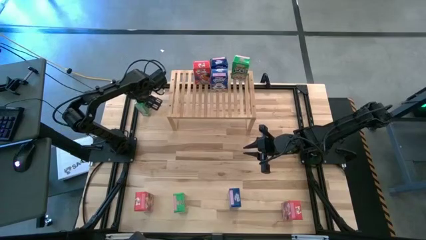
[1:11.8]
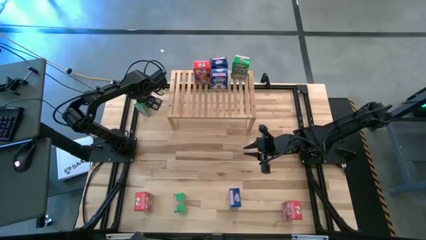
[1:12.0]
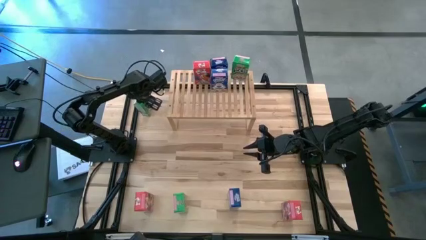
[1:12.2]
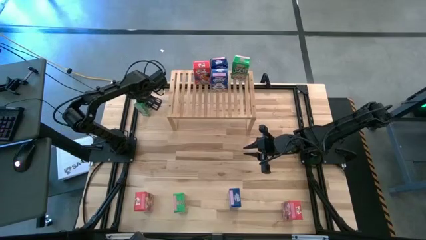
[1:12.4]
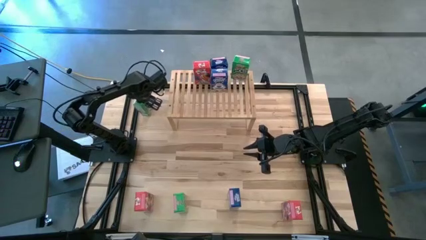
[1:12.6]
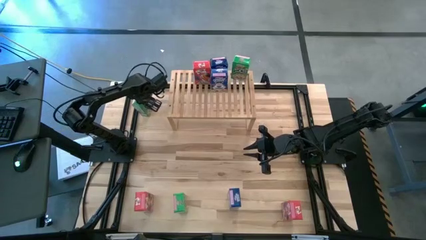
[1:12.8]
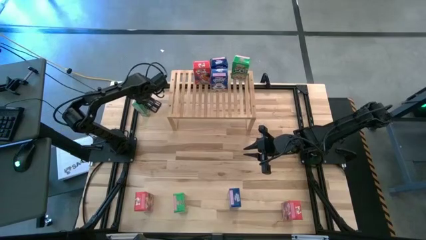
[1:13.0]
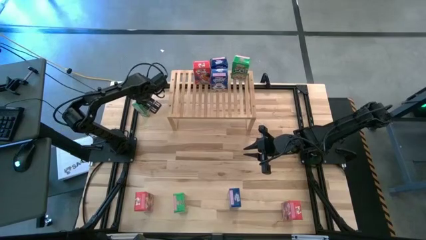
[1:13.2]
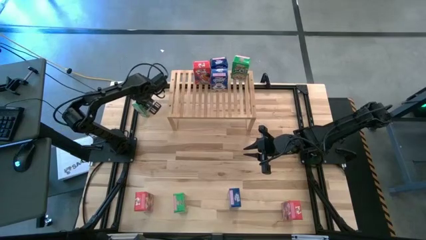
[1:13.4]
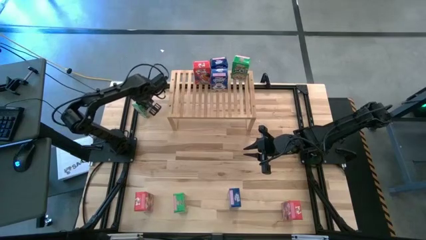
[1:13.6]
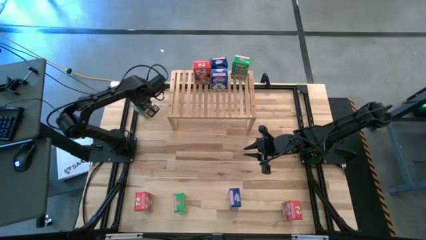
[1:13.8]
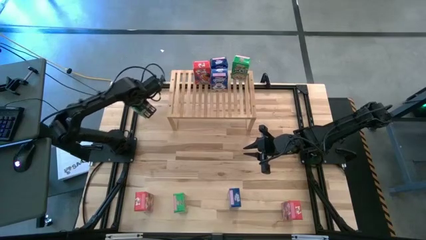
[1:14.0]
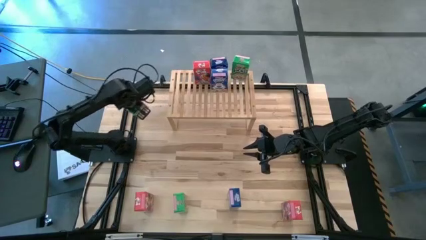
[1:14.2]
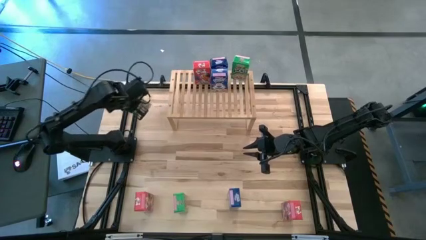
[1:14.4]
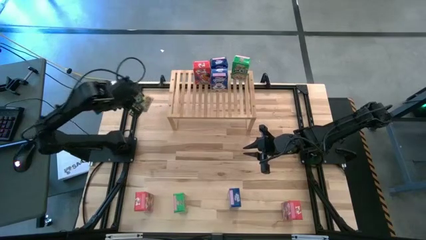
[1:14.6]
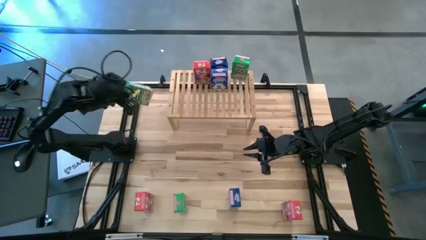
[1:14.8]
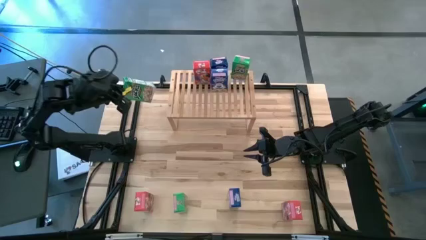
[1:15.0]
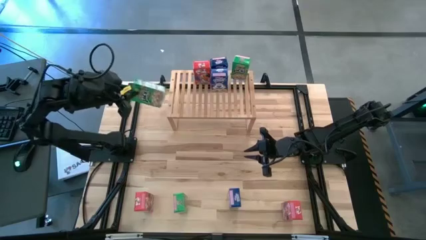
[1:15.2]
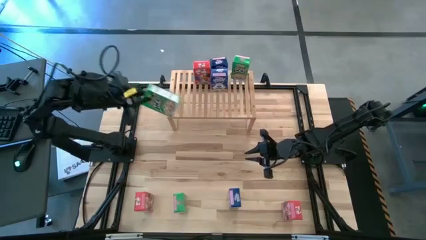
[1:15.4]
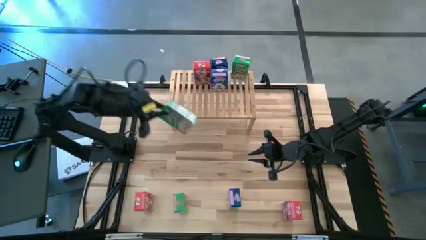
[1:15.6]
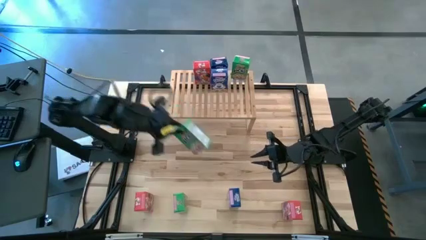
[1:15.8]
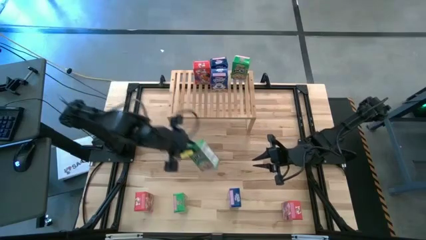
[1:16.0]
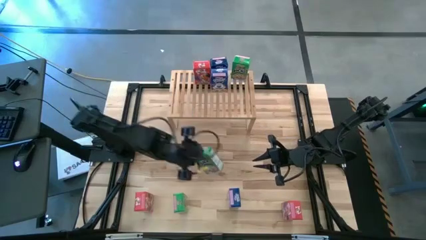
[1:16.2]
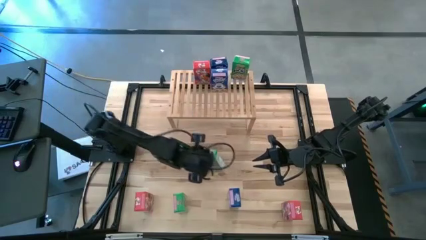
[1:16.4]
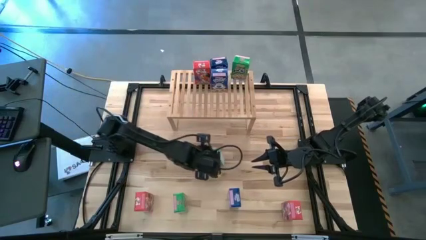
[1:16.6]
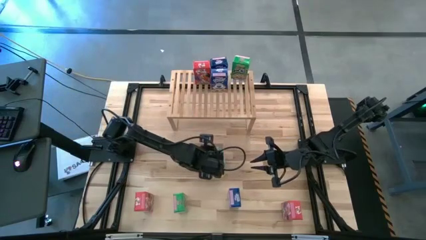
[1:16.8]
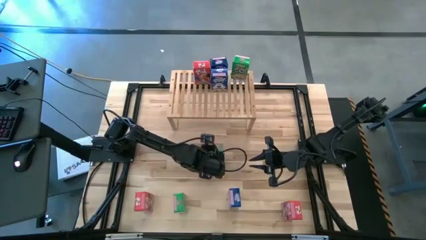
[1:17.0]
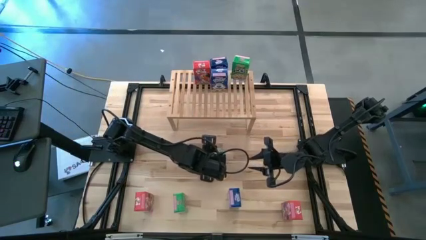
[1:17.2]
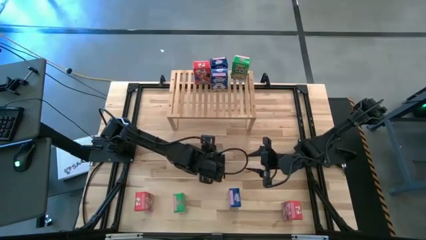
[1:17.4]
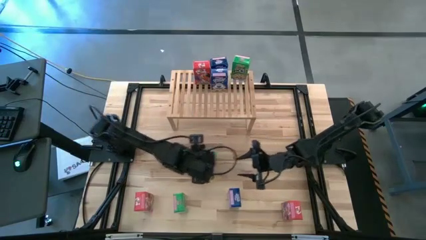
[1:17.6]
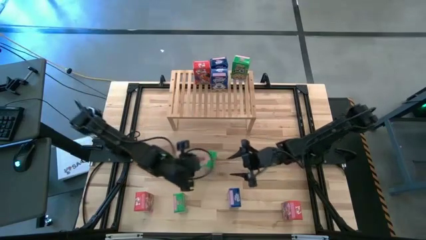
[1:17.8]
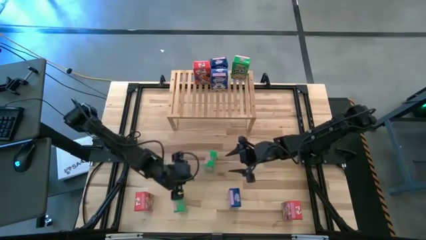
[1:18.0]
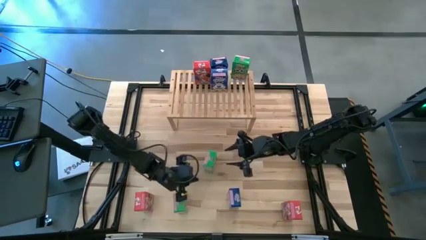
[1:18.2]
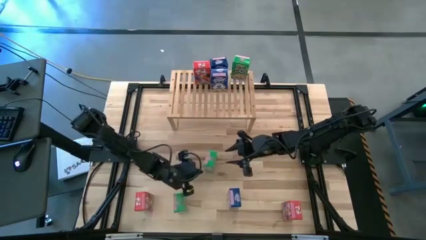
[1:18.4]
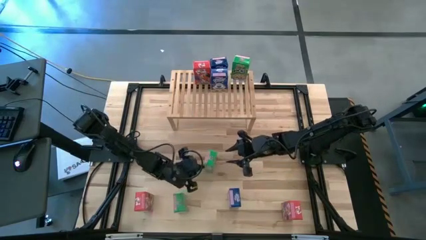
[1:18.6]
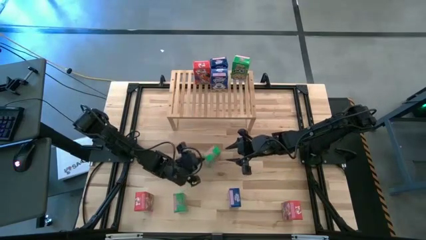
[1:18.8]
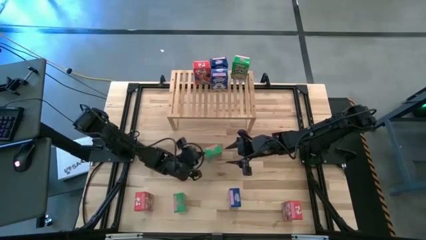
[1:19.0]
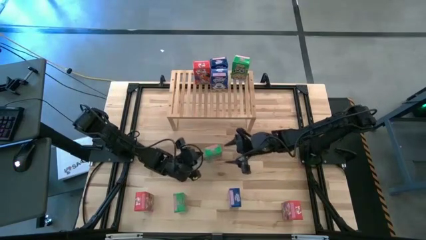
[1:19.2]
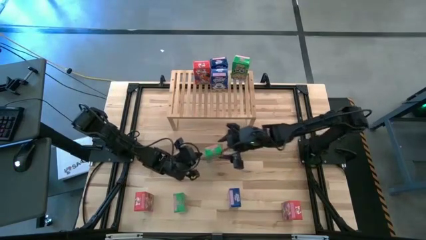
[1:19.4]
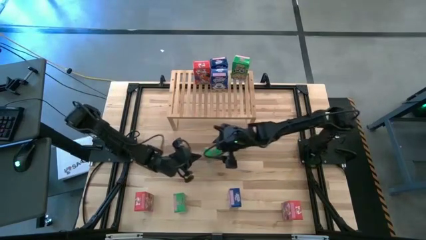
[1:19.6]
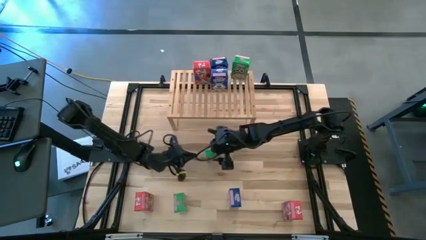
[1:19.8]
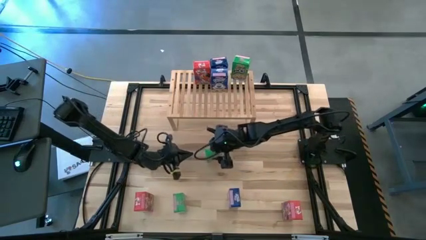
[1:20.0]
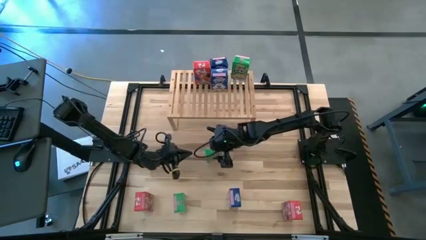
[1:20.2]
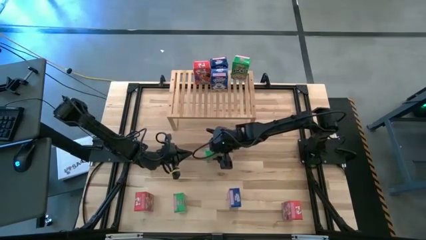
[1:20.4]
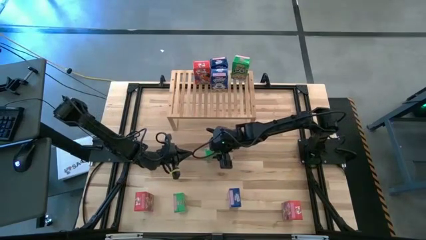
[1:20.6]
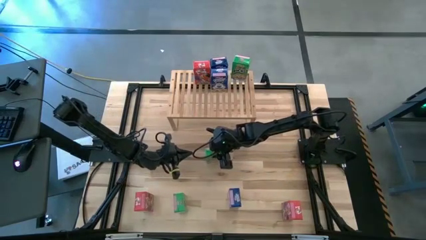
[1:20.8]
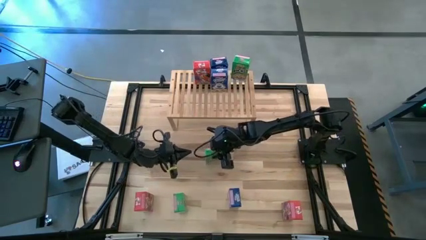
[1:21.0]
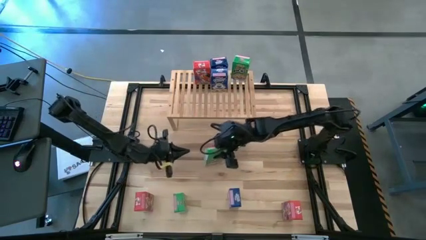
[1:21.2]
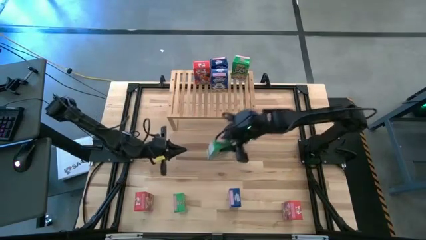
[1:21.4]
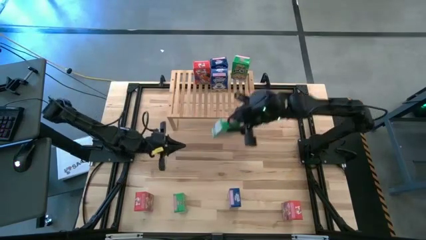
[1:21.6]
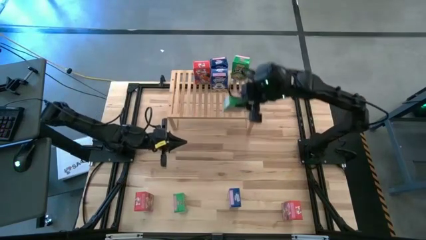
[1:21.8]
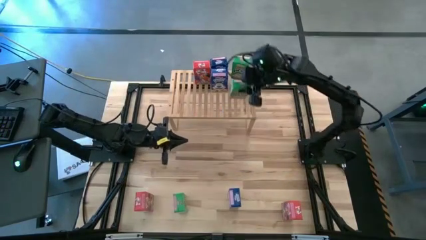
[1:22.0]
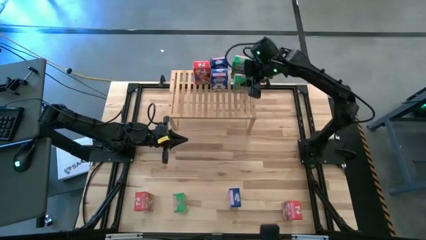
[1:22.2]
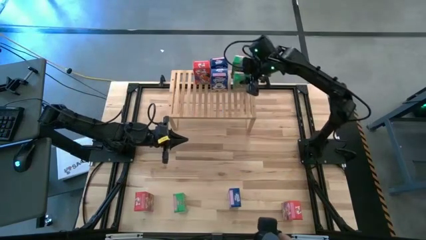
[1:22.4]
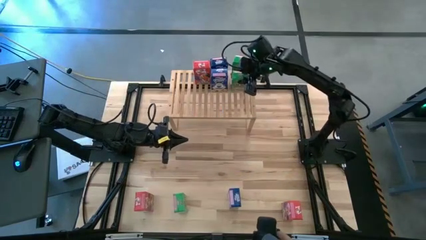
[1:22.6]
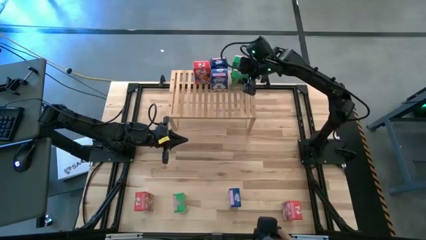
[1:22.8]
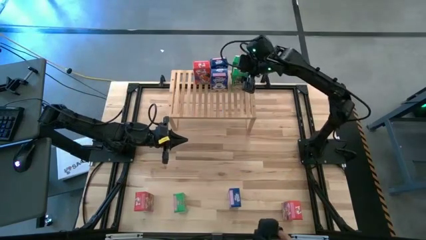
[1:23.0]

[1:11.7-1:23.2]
Task: Stack cereal on shelf
Put the top green cereal box aligned with the other green cereal box on the shelf

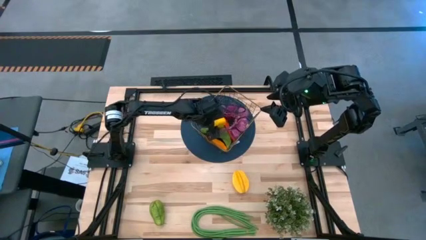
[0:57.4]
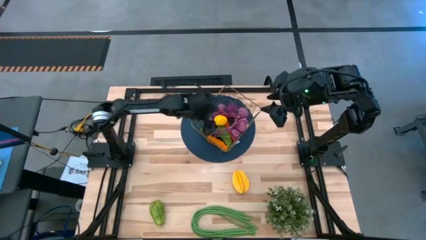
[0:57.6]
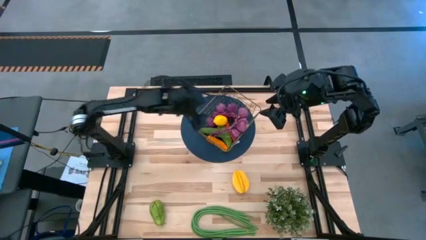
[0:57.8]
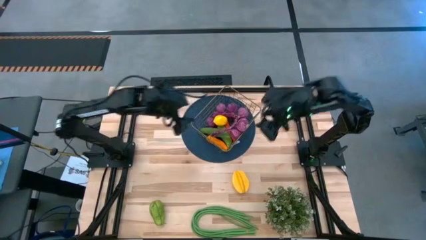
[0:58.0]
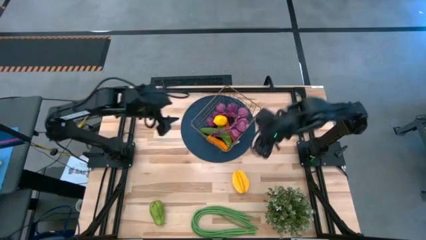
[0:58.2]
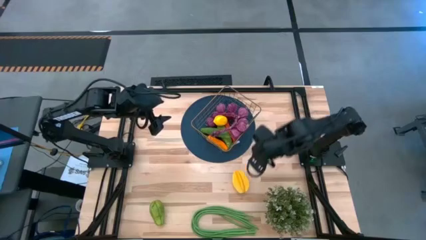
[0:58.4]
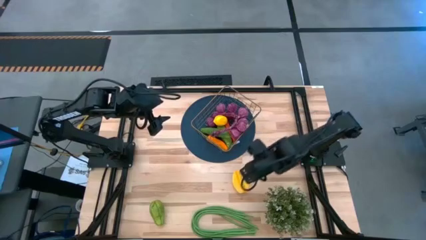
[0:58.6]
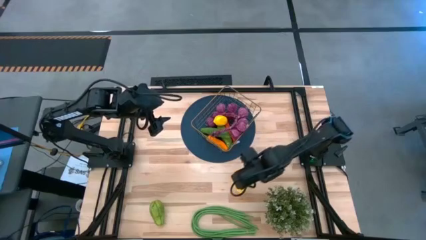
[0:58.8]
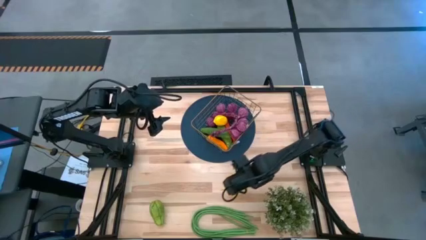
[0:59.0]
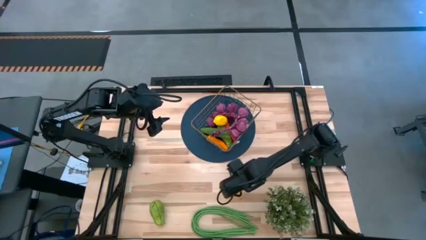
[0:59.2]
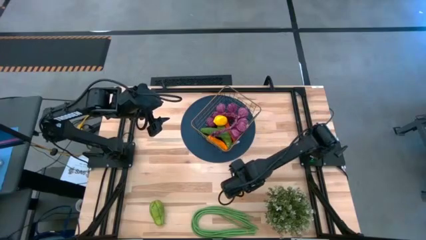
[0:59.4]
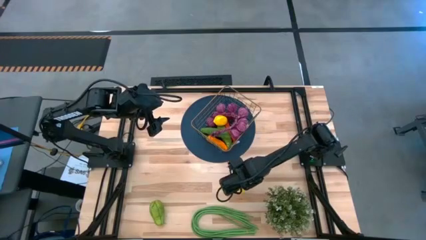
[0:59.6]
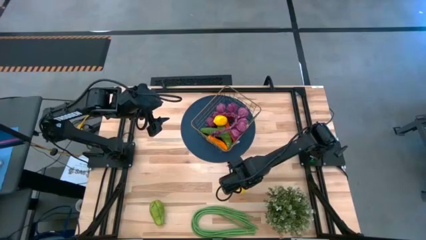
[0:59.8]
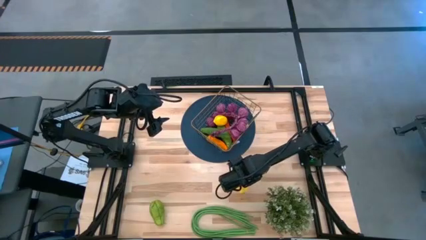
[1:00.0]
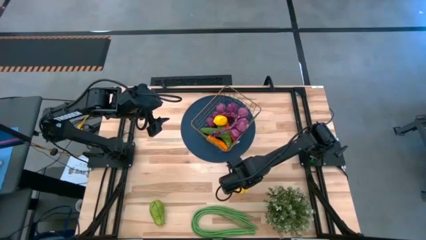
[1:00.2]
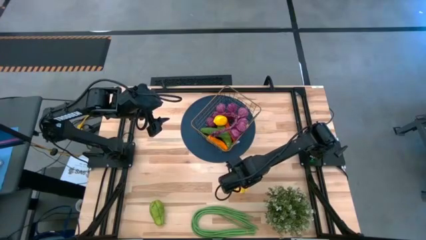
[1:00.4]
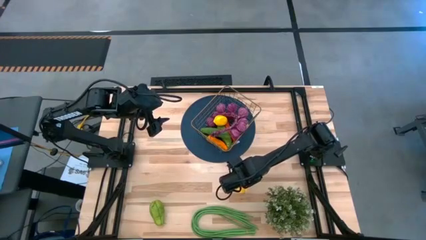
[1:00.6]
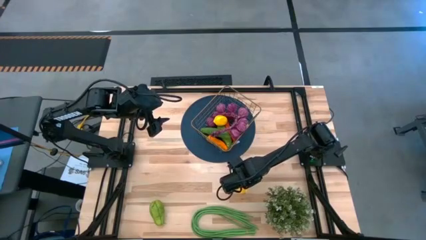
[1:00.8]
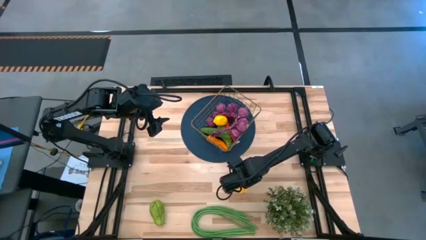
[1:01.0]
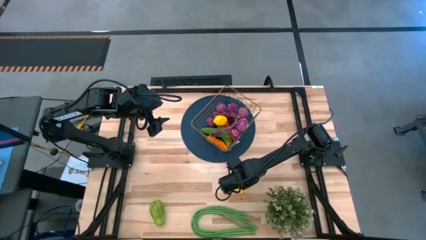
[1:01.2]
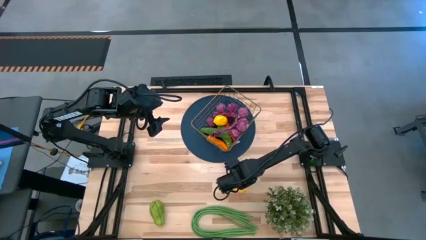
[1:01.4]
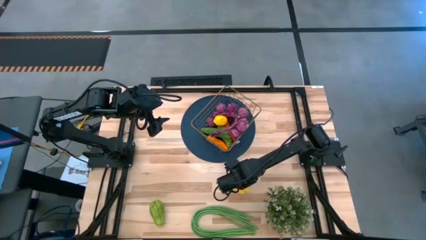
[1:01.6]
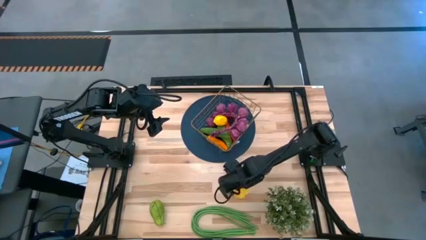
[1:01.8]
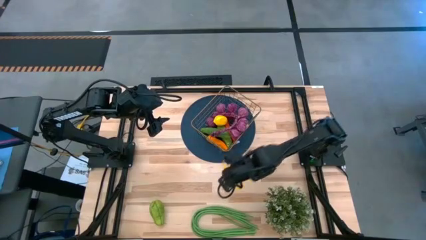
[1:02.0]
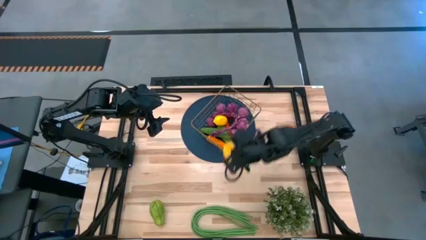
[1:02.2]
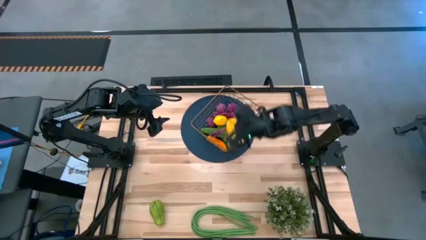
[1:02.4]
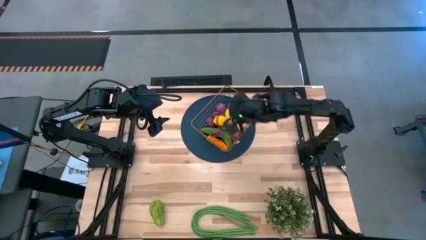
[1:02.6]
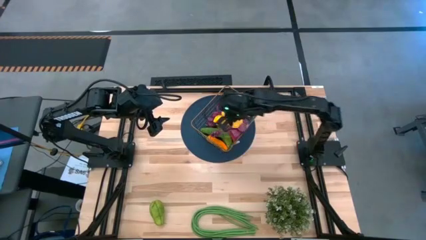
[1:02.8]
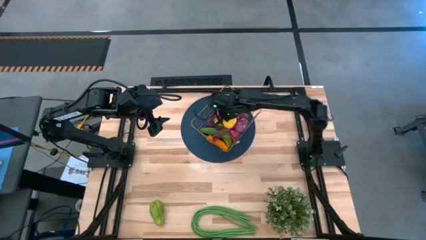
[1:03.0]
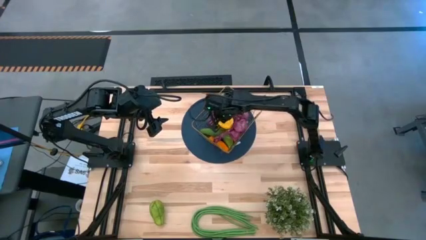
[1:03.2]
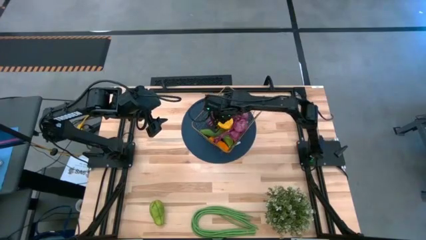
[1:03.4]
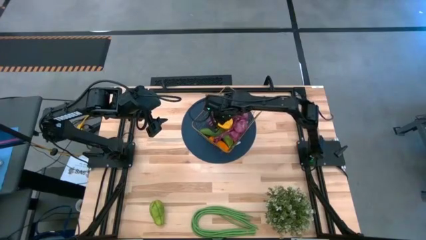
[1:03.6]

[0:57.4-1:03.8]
Task: Build produce basket
Put the star fruit into the wire basket
